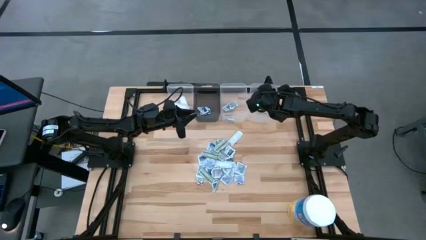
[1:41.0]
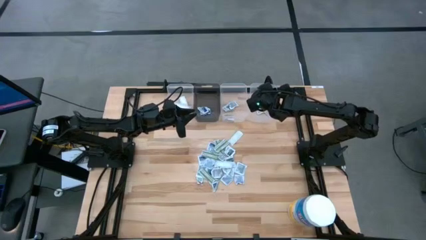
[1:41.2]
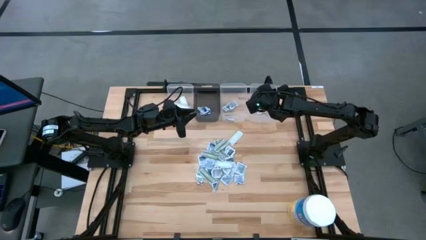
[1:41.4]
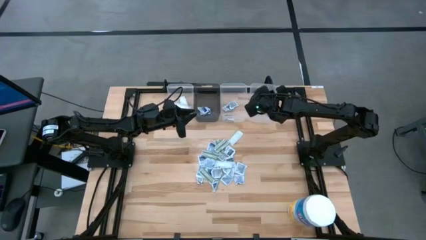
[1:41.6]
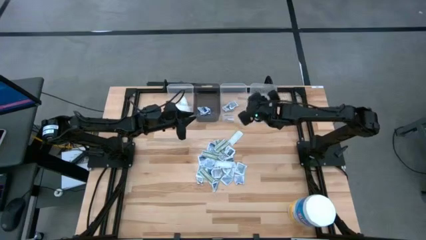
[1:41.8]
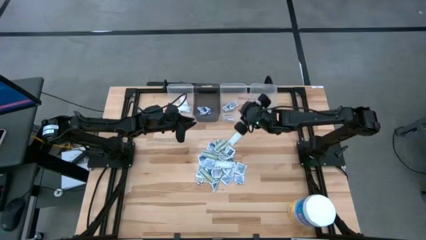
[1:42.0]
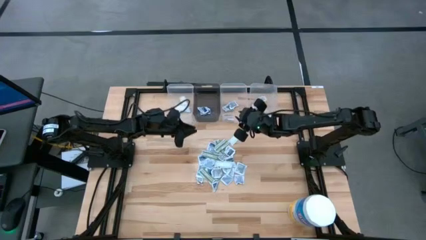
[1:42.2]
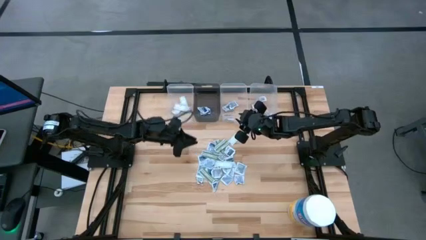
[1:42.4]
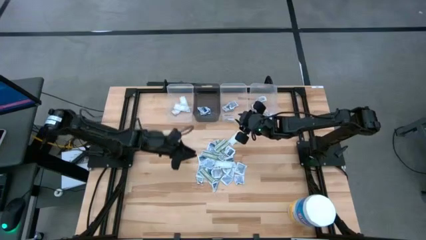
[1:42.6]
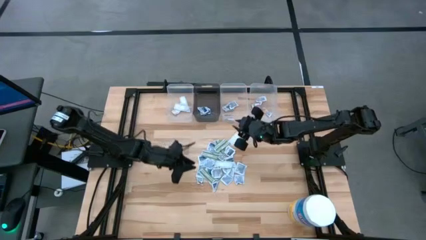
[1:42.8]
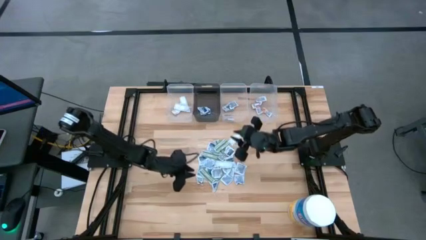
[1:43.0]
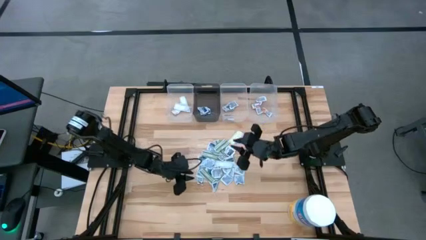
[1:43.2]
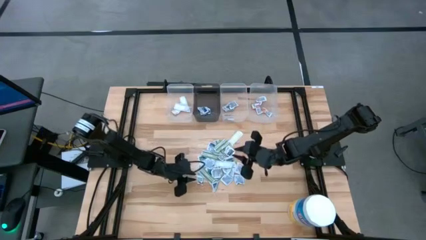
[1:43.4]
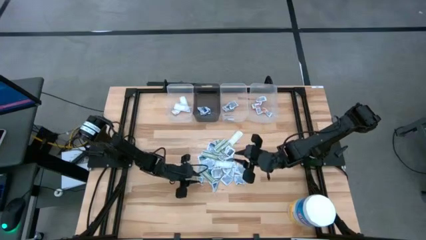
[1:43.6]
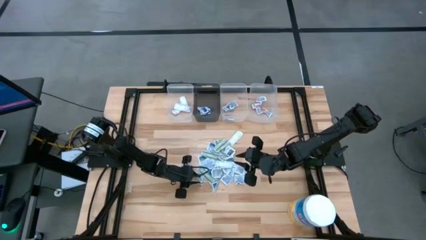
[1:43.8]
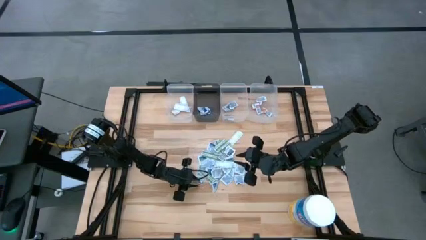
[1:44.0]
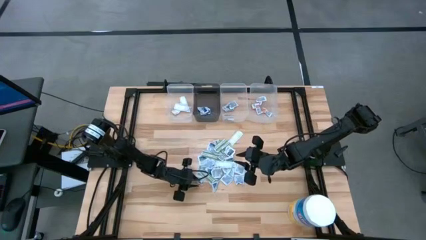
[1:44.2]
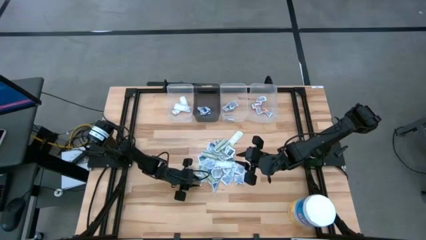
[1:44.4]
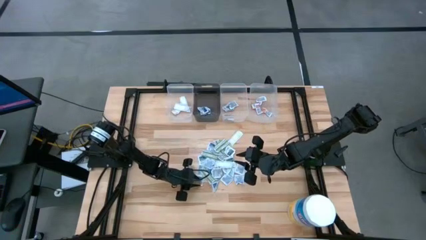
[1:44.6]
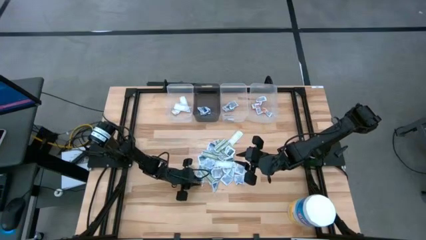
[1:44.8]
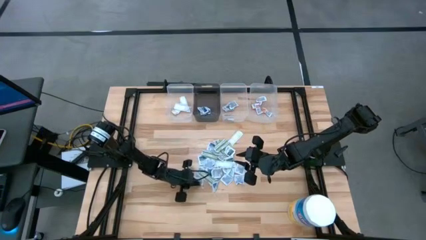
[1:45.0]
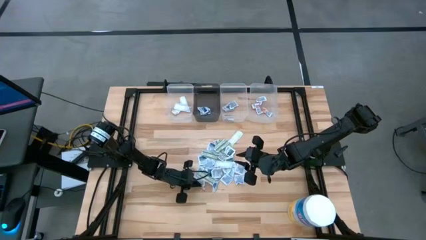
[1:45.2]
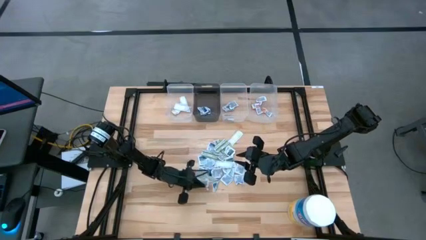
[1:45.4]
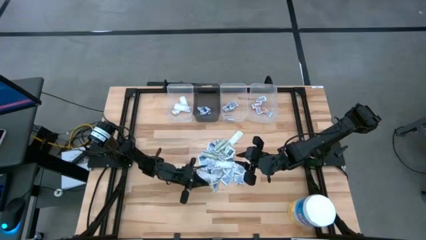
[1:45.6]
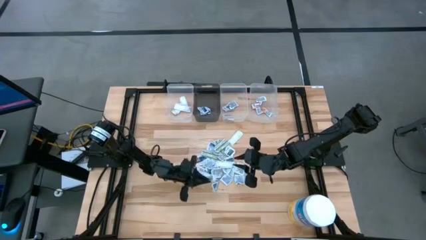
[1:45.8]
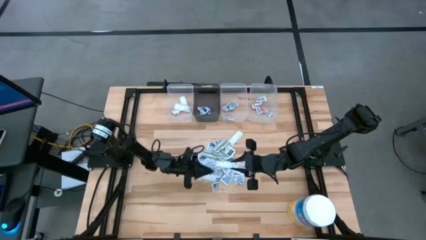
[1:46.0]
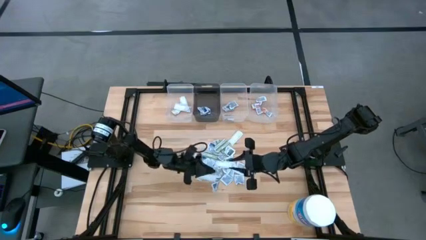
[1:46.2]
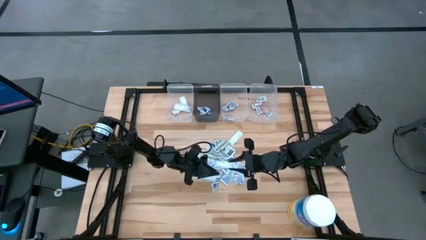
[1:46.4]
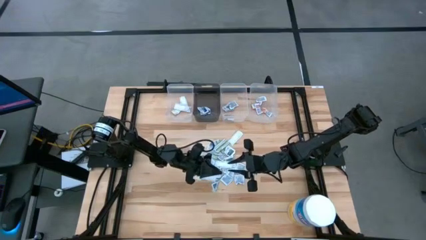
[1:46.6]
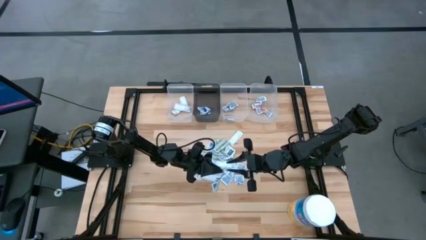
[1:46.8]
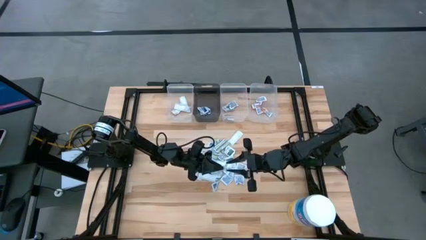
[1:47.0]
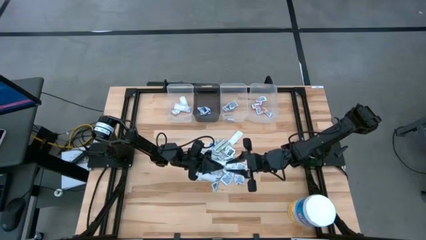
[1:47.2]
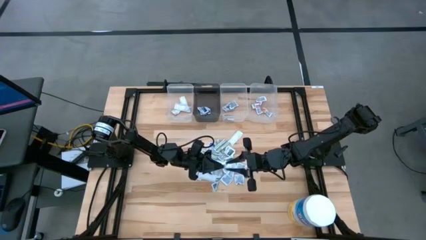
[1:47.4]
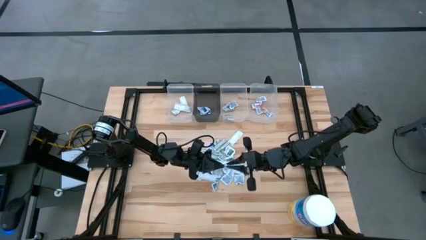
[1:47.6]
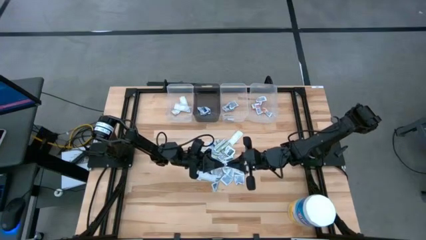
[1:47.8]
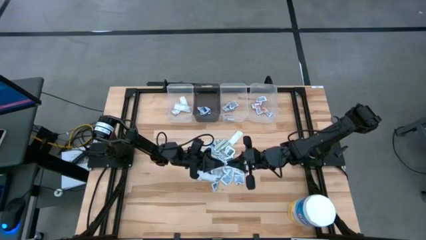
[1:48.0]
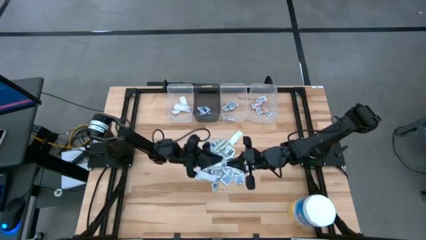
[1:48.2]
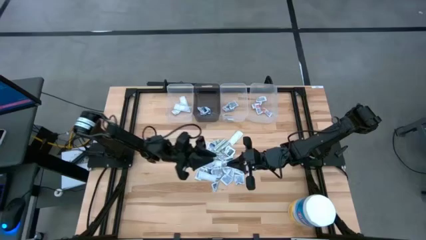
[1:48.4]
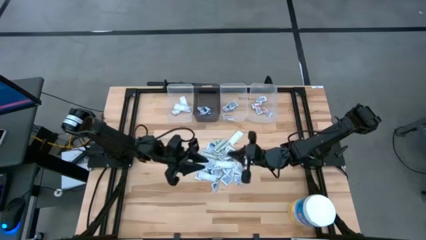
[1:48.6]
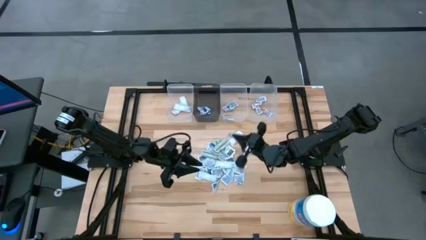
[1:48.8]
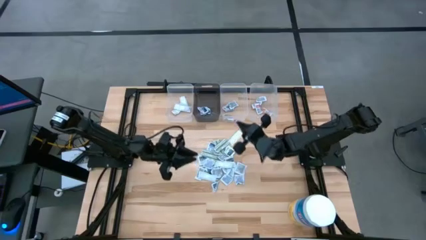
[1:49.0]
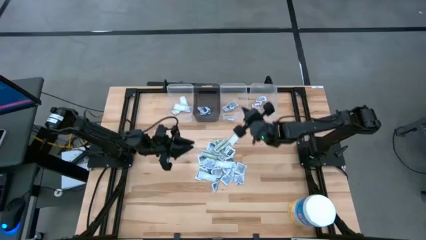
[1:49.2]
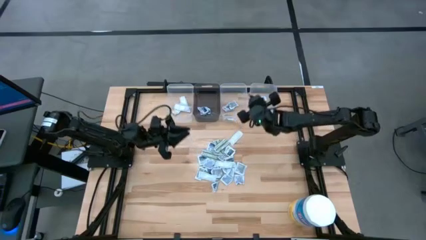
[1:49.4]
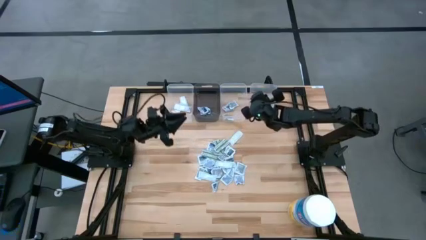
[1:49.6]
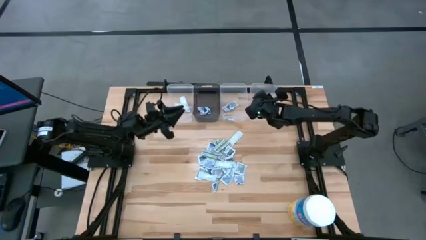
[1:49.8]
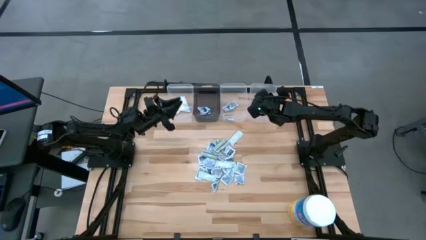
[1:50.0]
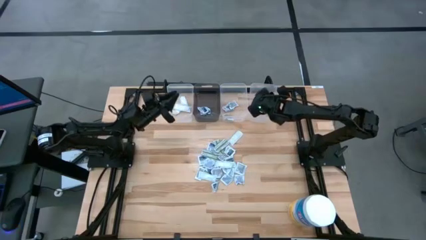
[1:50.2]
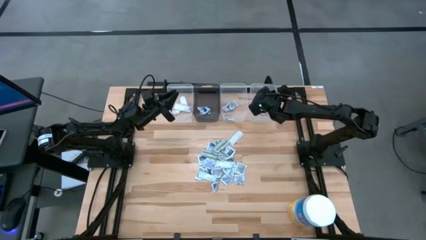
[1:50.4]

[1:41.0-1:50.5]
Task: Pick & Place First Aid Supplies
Put the ointment pack into the right transparent bin

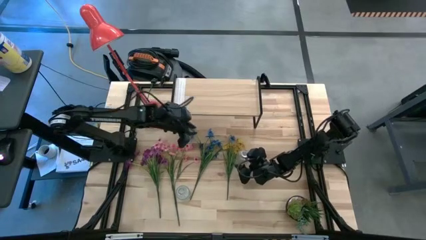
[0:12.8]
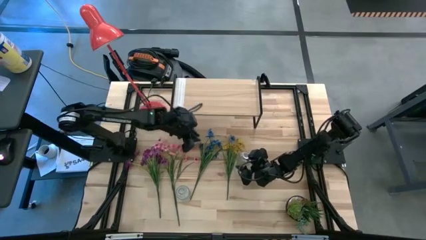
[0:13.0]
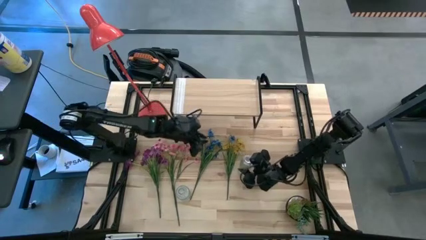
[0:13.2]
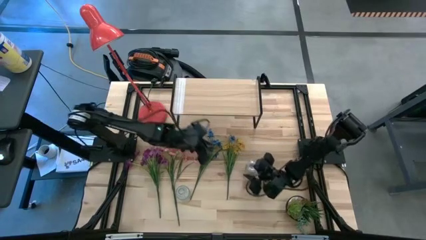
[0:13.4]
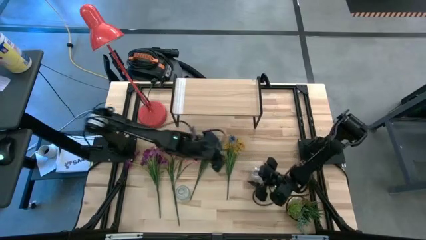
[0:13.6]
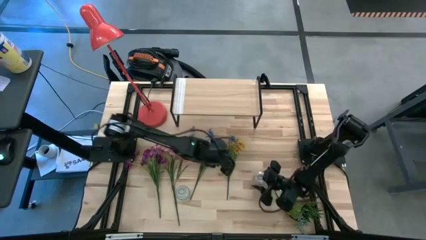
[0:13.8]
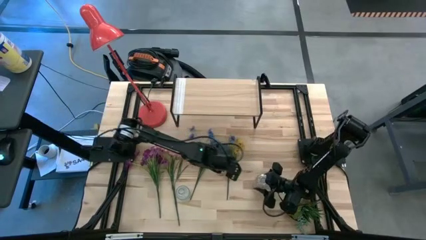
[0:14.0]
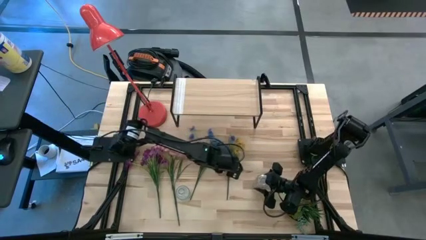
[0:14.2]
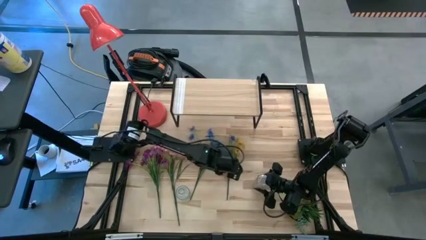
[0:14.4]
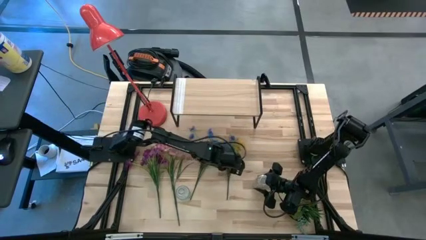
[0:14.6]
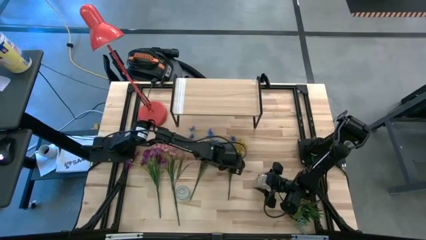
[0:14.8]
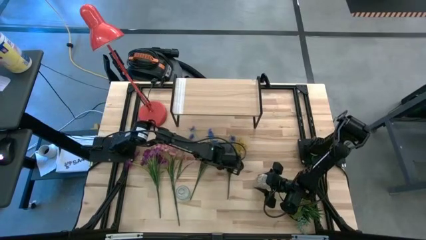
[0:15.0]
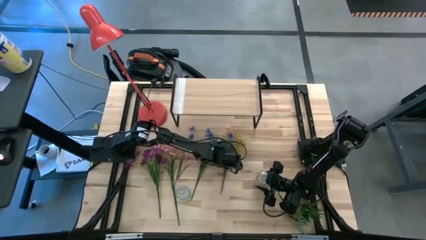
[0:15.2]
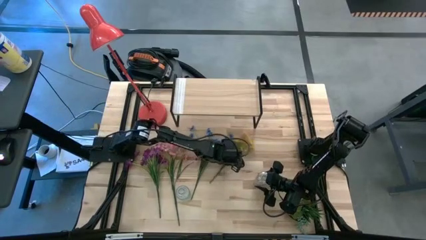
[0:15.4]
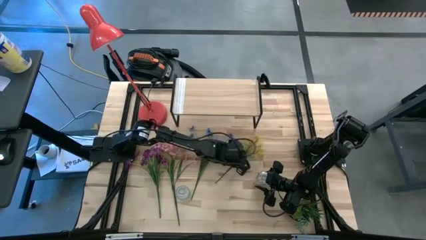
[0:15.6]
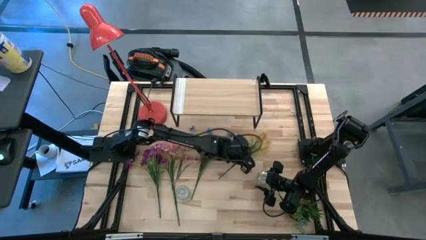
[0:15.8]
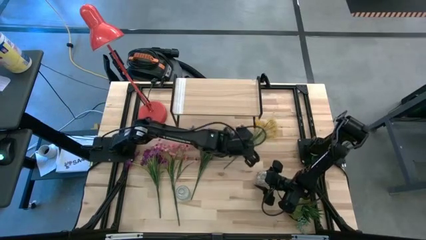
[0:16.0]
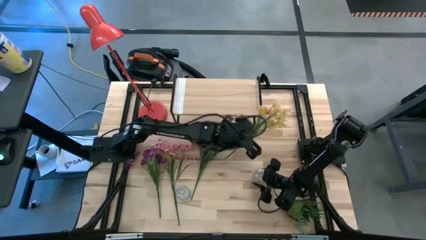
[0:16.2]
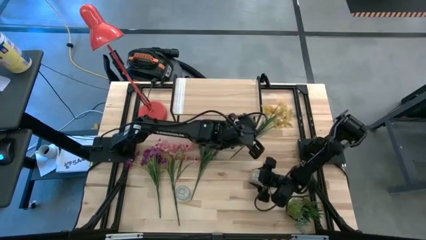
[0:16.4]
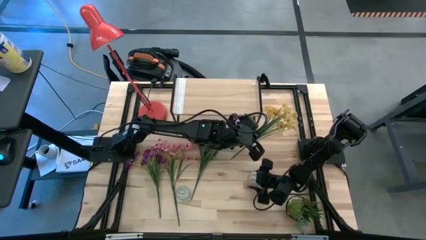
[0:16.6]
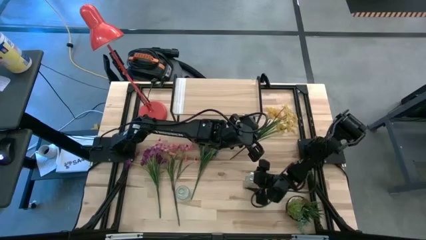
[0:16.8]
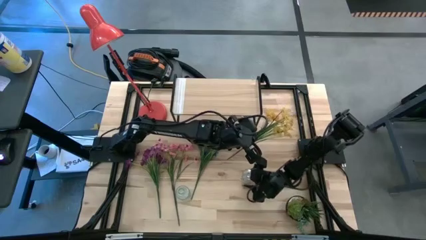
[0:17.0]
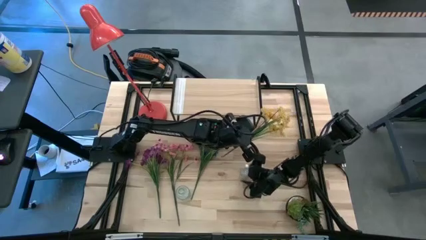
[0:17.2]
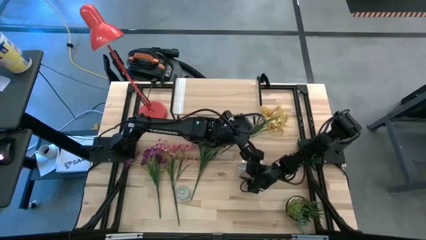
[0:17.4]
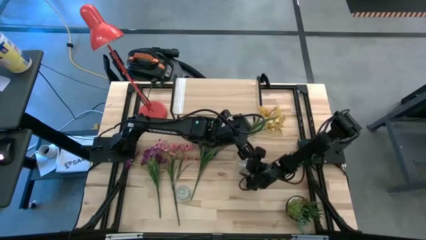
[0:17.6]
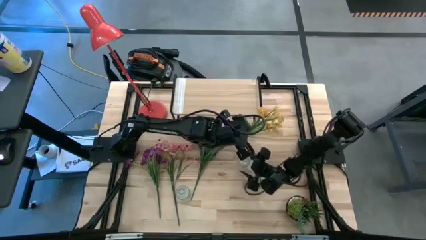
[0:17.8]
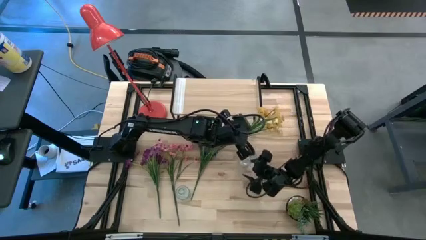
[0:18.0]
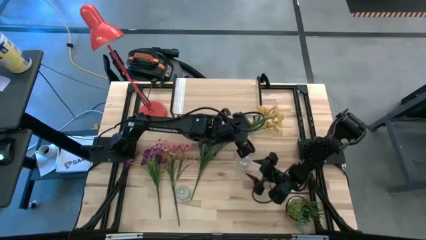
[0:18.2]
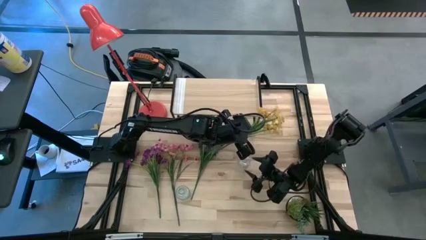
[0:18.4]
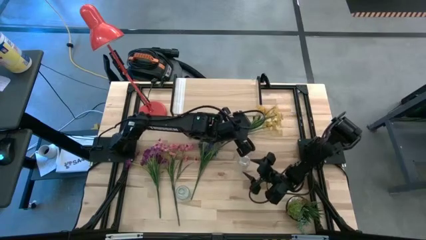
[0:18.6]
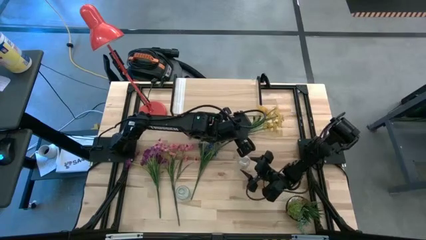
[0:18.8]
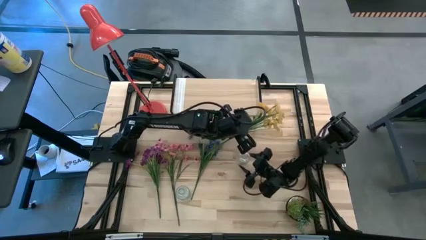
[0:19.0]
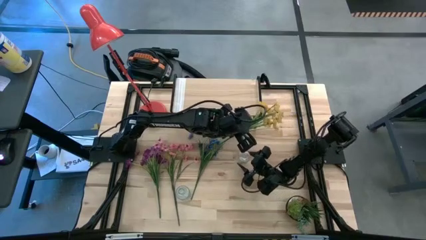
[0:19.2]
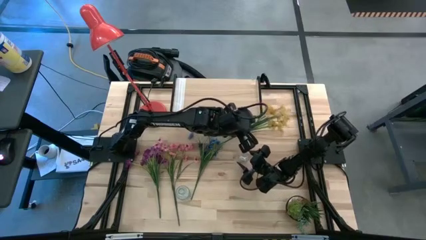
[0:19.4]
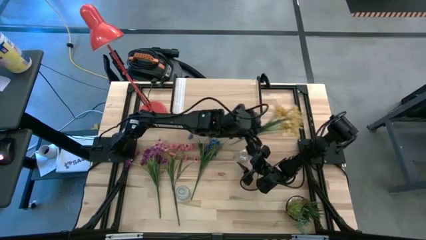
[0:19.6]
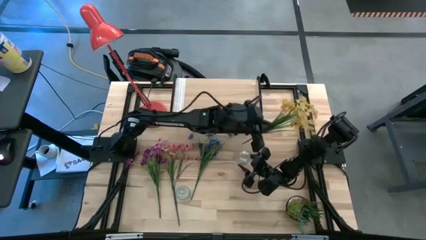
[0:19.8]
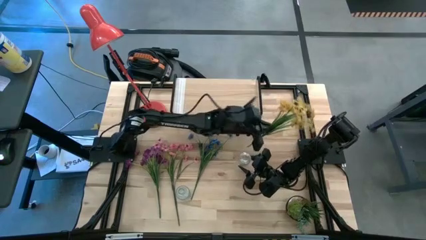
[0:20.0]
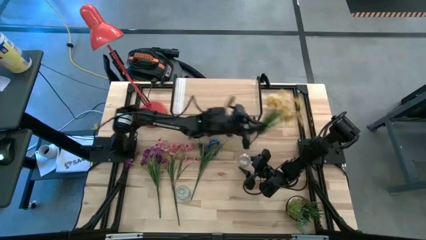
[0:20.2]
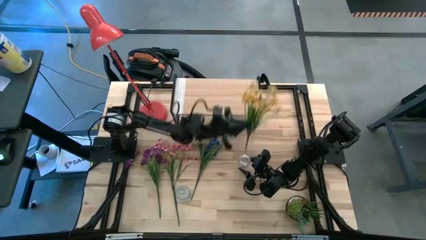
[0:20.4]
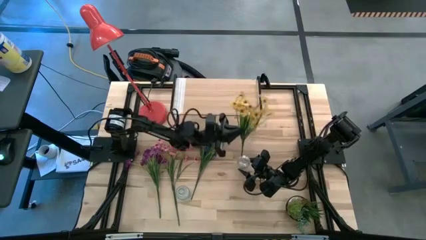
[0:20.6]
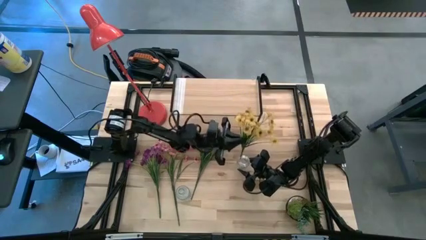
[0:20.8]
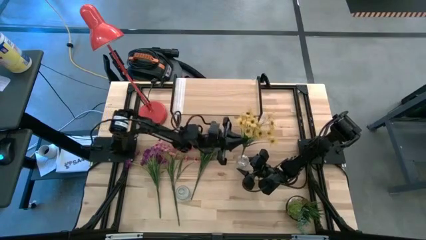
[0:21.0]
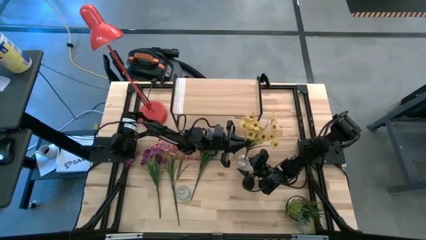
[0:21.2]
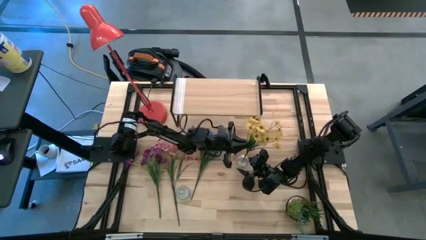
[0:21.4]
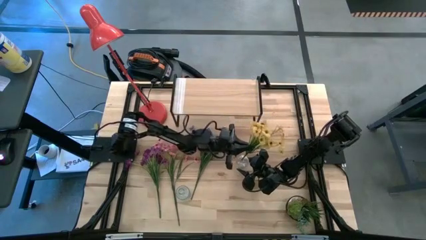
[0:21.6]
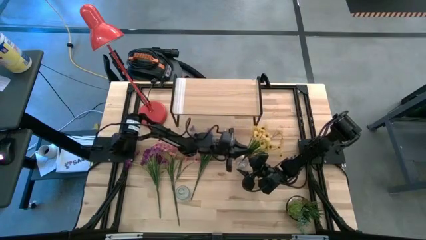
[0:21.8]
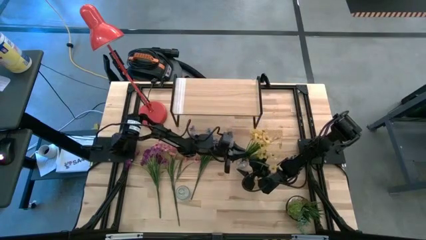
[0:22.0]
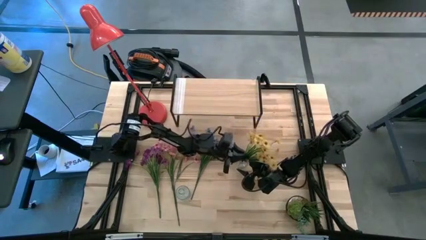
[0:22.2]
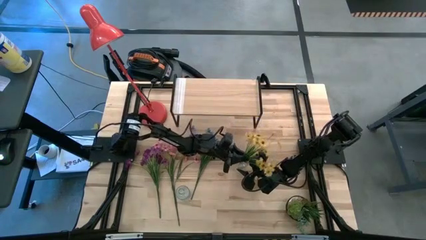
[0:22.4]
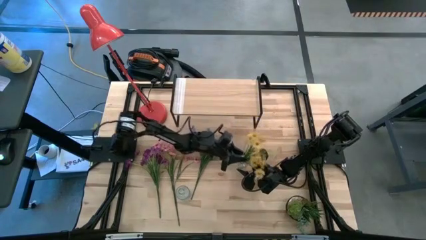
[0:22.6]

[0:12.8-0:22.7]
Task: Pick and place flowers into a vace then onto a shelf
Put the yellow flowers into the top vase
